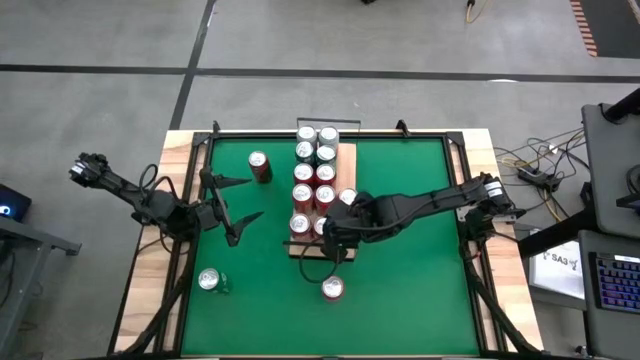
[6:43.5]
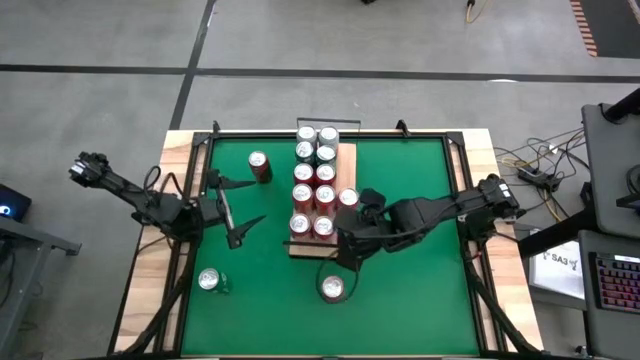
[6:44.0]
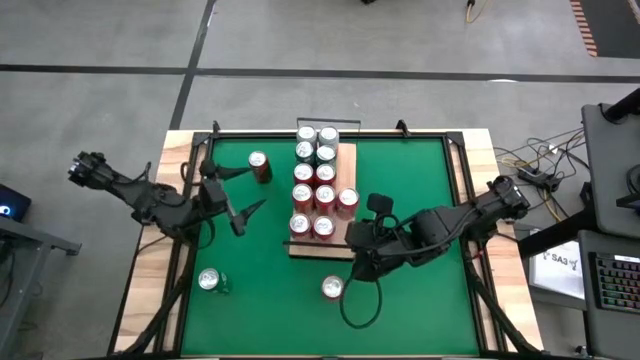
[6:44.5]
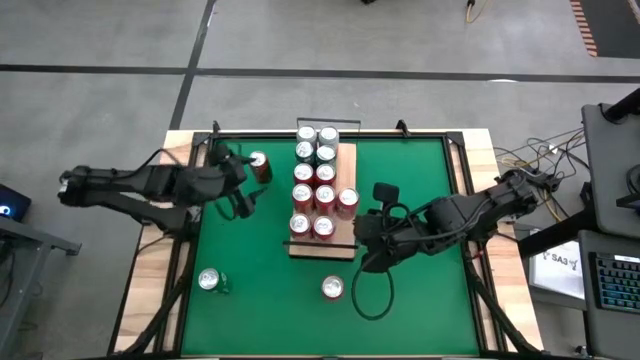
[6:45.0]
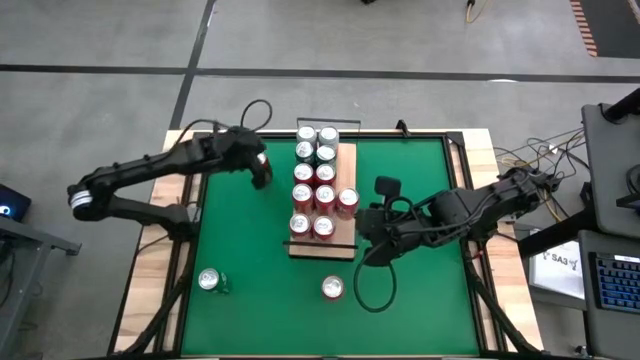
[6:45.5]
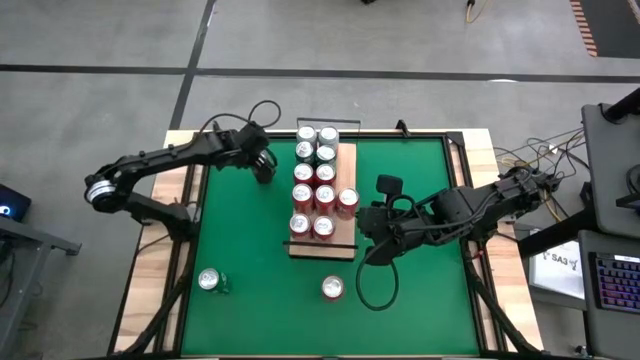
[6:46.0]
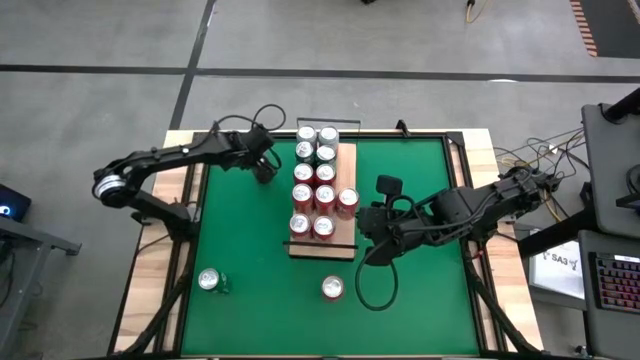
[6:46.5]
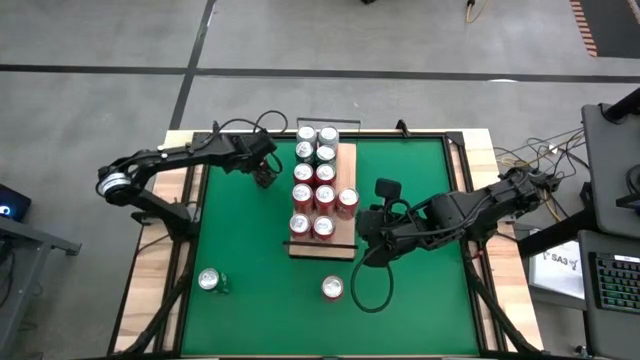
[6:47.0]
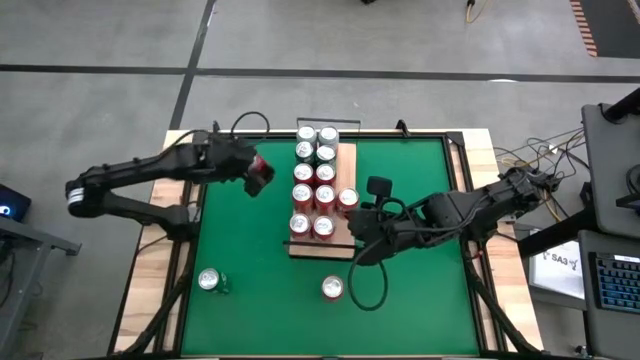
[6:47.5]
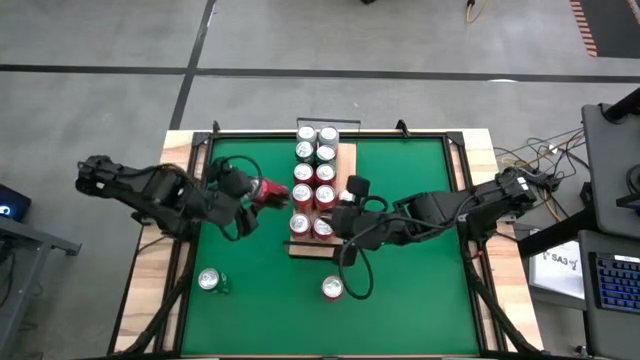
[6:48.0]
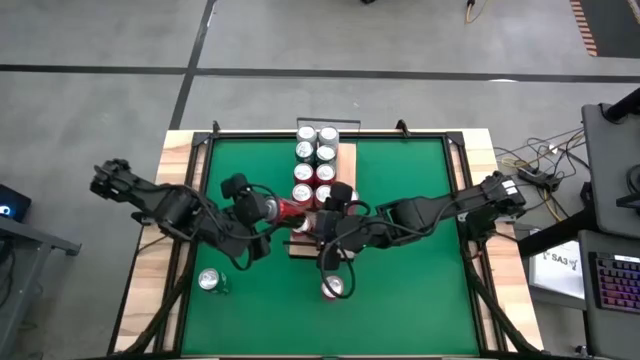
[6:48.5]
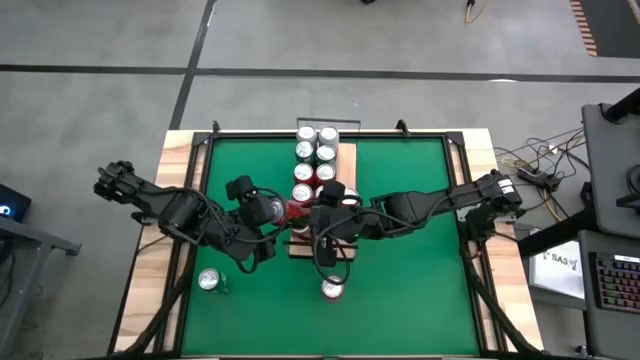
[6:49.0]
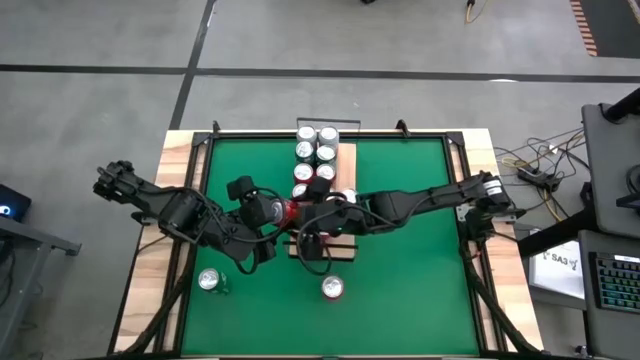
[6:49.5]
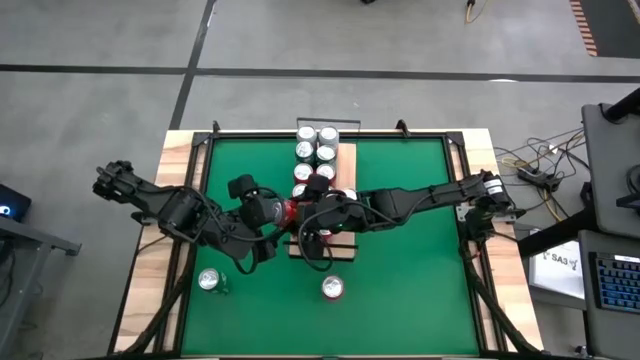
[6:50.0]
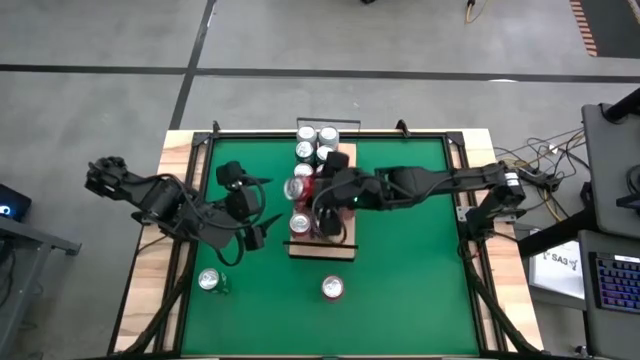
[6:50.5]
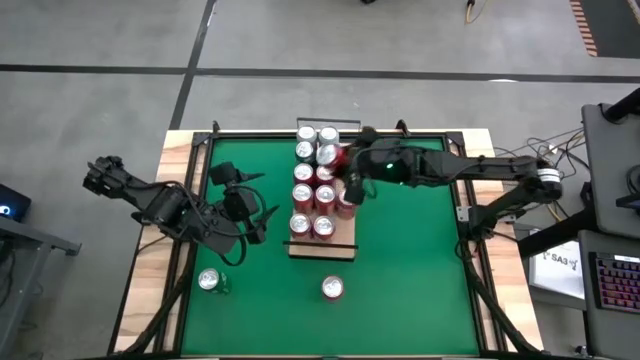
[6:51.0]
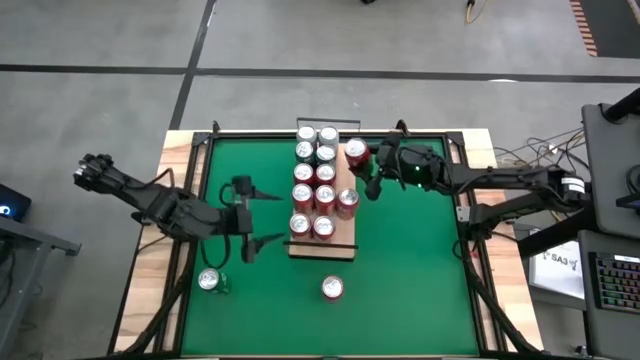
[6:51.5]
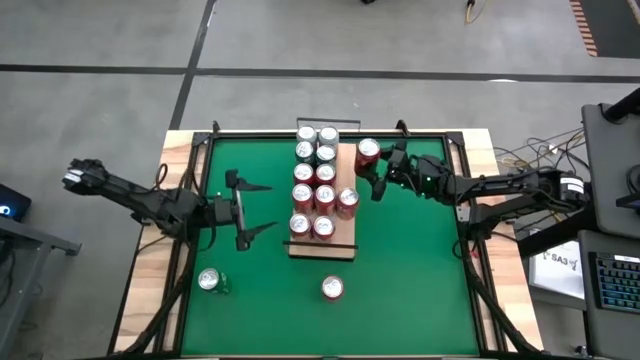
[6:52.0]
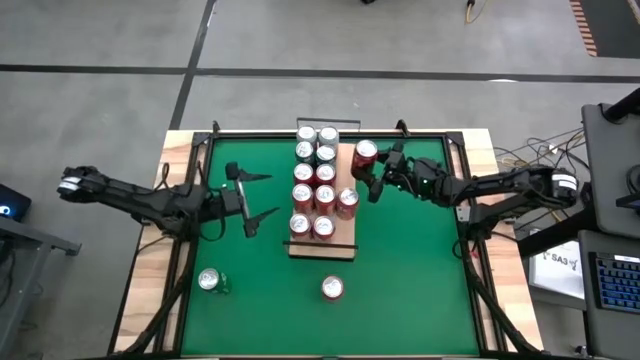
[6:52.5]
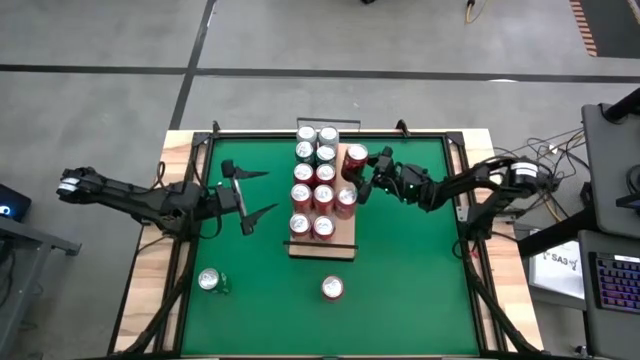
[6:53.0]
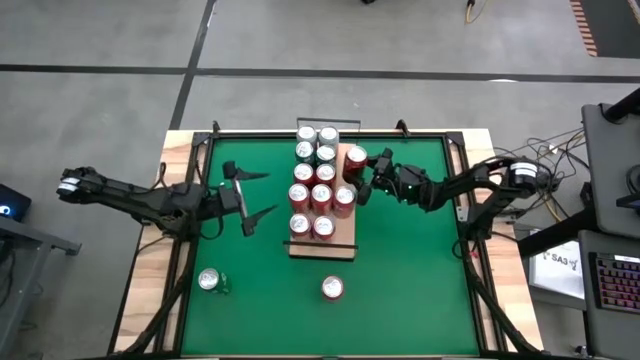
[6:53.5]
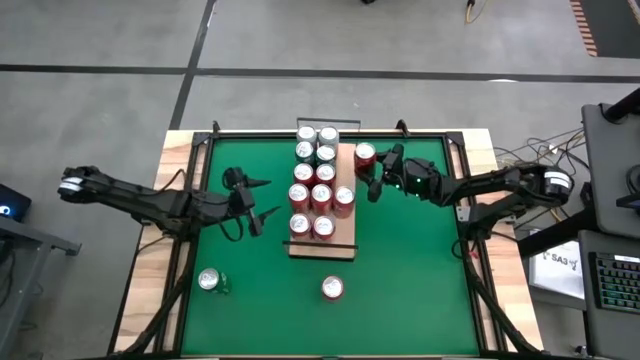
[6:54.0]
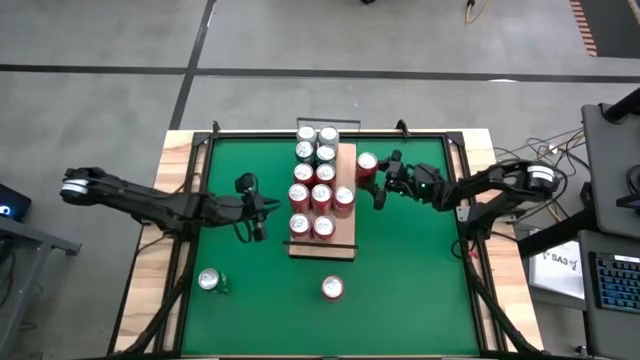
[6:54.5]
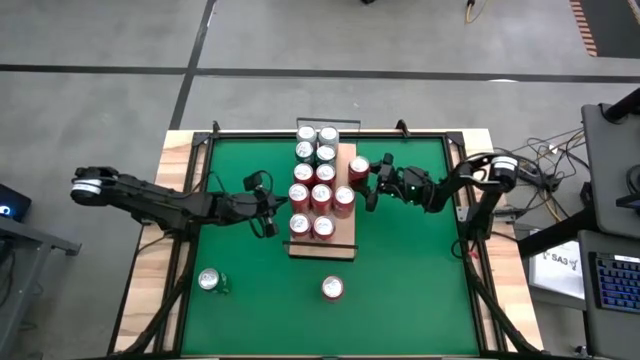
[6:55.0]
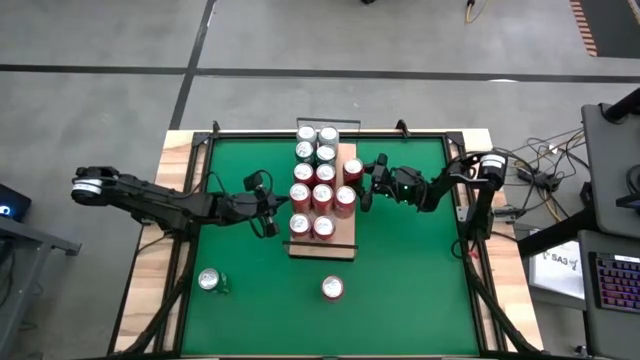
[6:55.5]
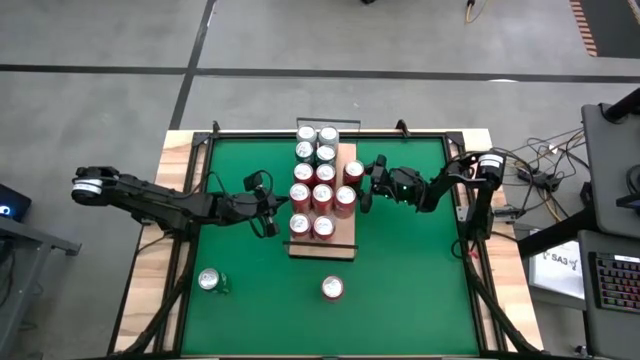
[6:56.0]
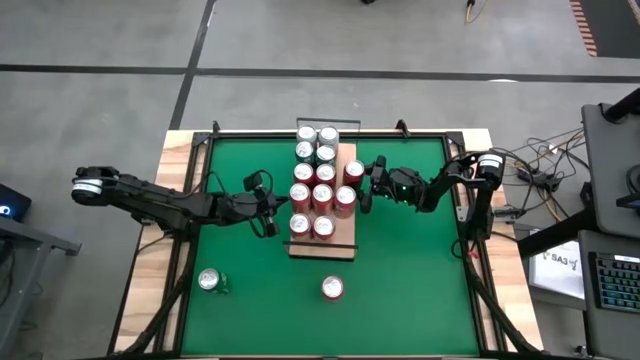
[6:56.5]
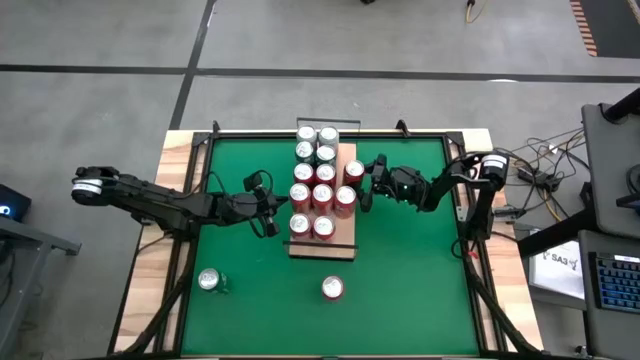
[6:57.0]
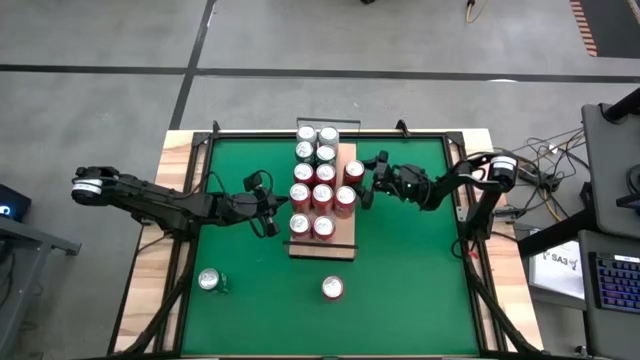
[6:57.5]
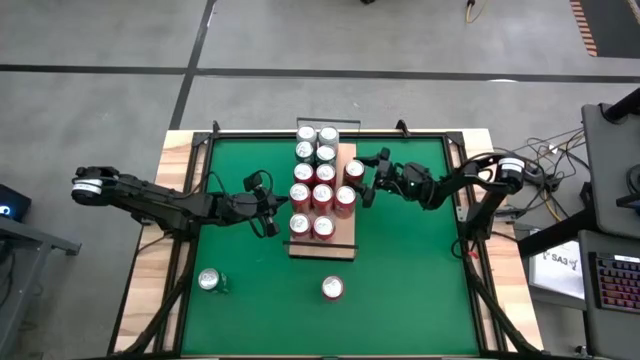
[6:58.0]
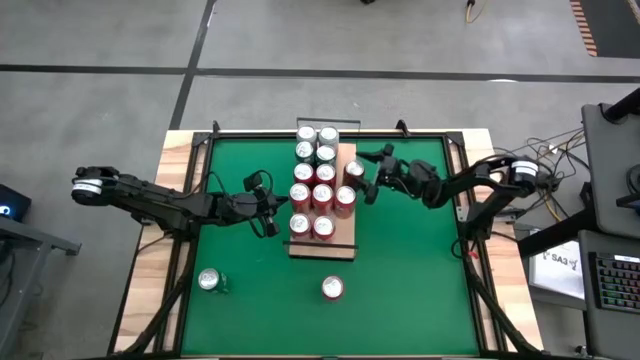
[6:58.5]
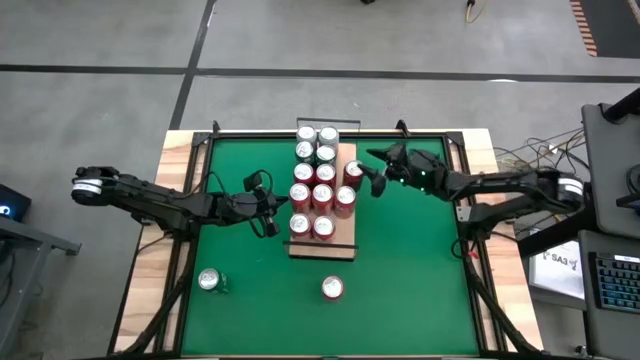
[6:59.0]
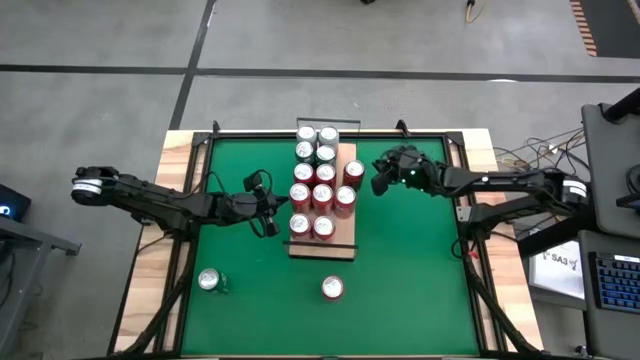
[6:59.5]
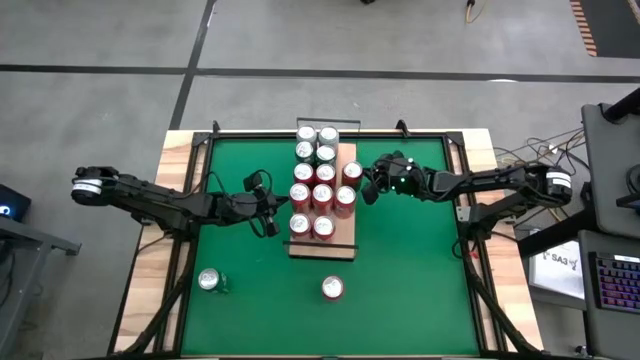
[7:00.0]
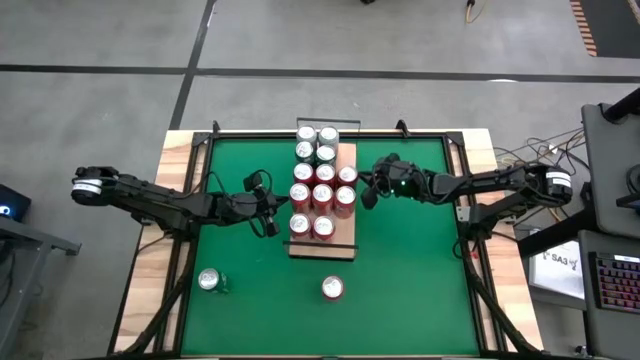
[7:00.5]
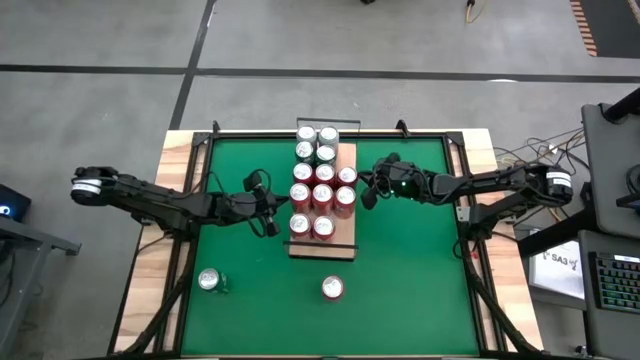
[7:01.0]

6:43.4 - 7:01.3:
Task: Place canned beverage on shelf
Put the soda can on the shelf and aligned with the other red soda can

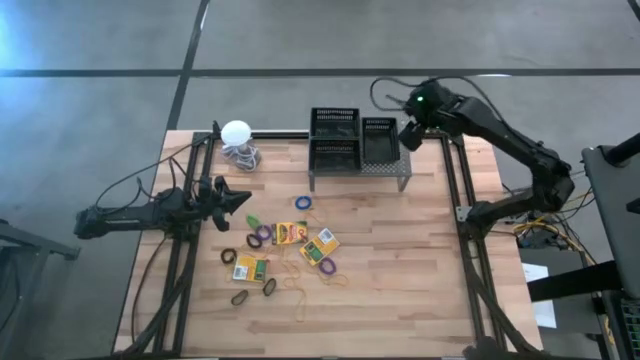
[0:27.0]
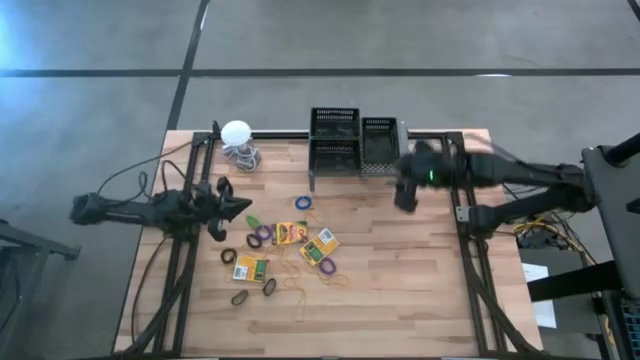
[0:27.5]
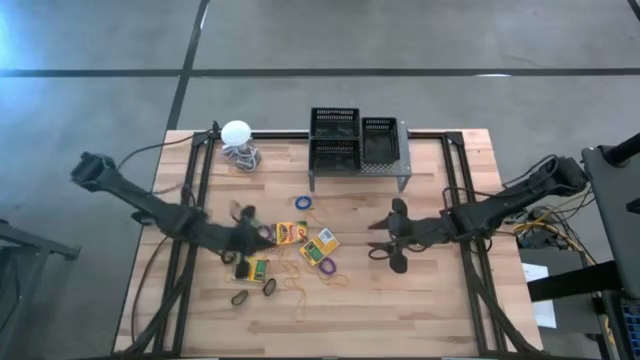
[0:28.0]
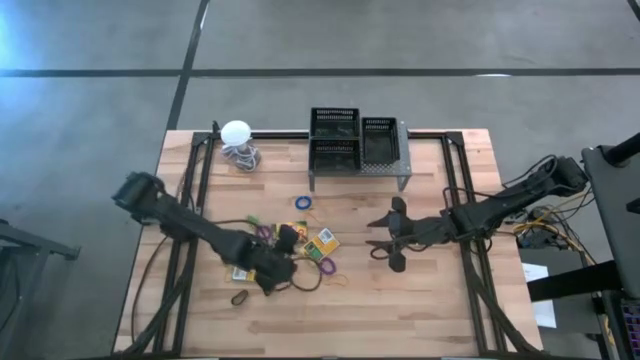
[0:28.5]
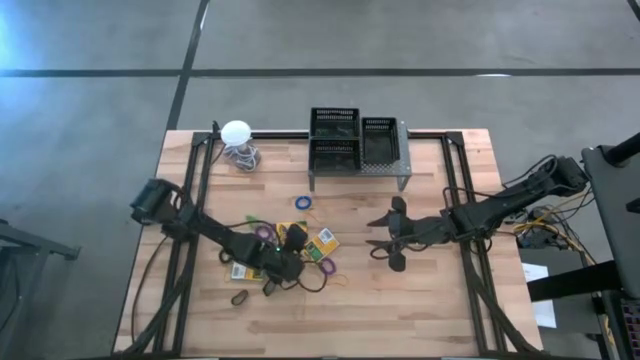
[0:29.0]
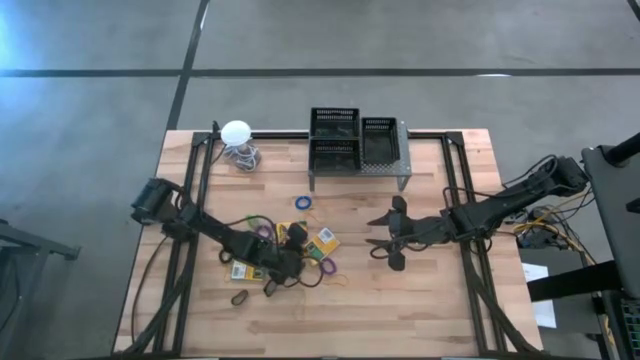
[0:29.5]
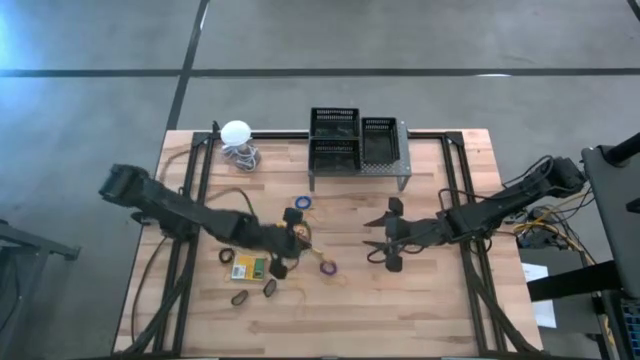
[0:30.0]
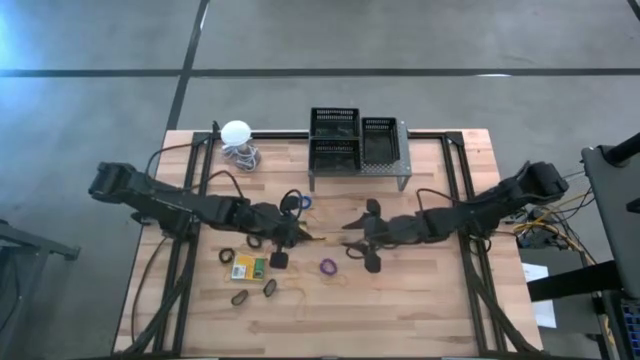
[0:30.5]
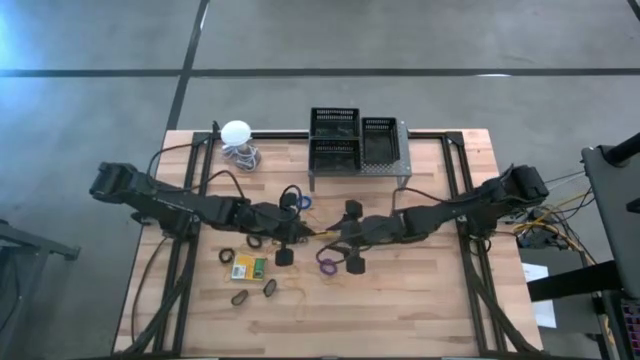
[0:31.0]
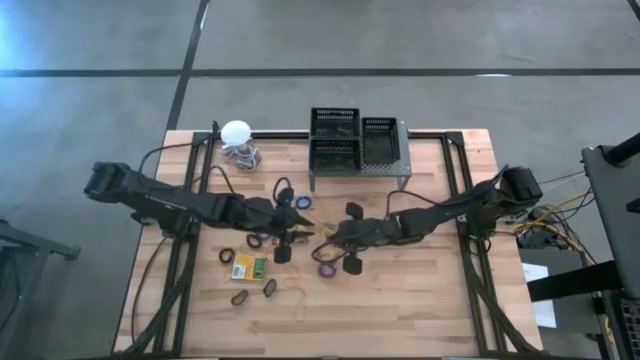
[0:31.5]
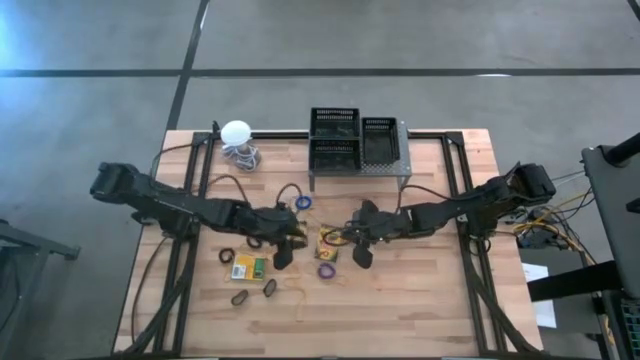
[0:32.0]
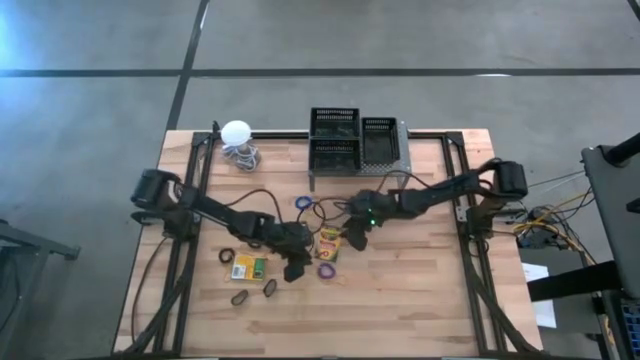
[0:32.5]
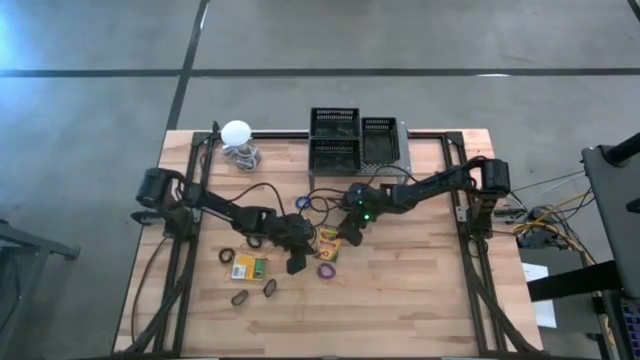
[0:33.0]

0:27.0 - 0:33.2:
Task: Pick & Place Office Desk Supplies
Put the bottom right yellow crayon box into the right black bin
